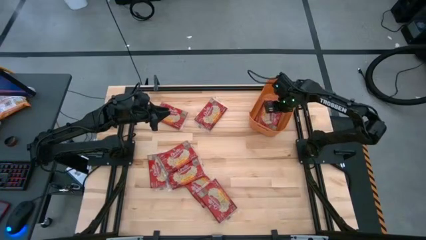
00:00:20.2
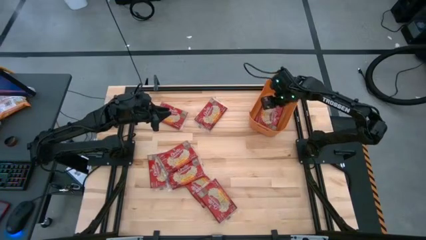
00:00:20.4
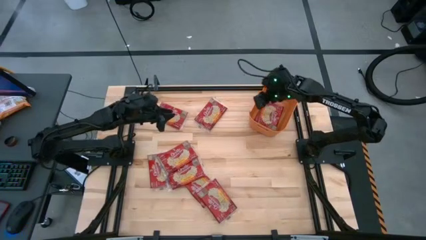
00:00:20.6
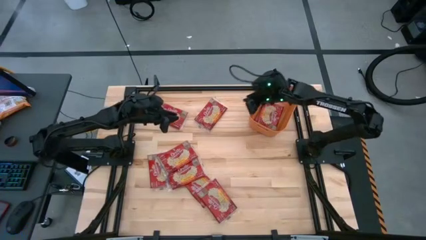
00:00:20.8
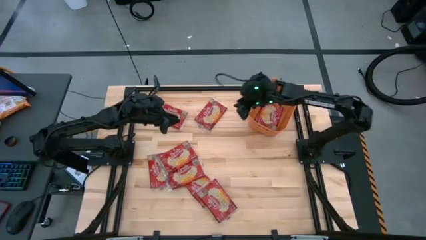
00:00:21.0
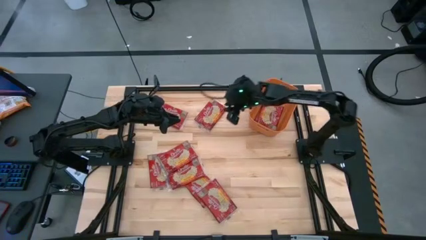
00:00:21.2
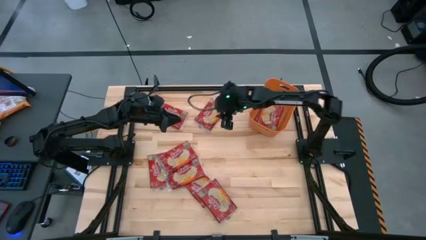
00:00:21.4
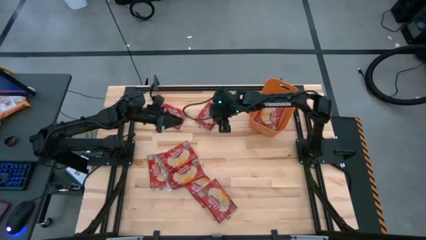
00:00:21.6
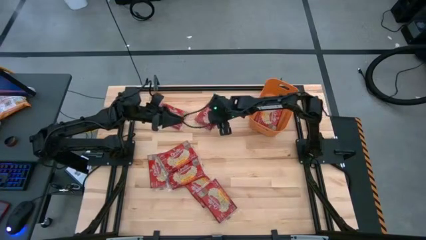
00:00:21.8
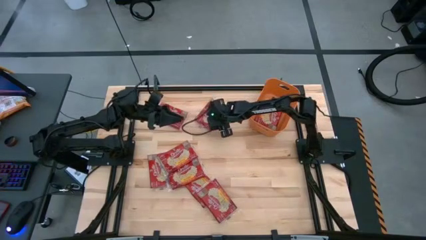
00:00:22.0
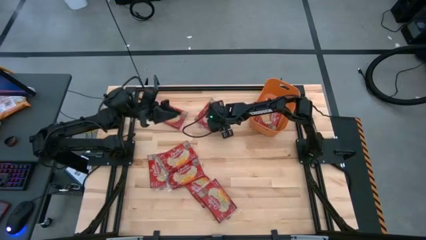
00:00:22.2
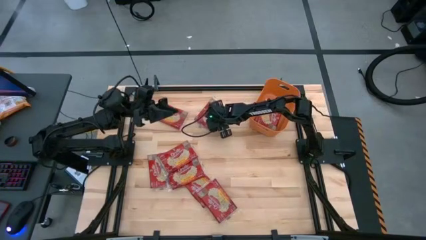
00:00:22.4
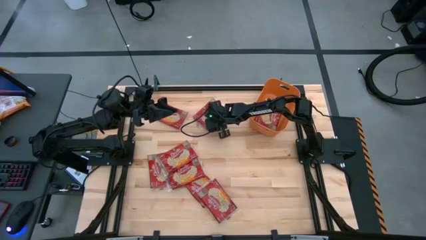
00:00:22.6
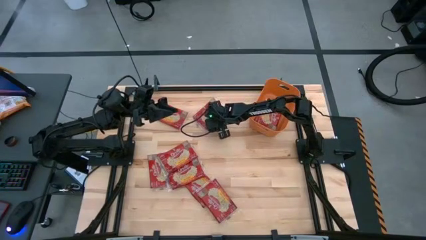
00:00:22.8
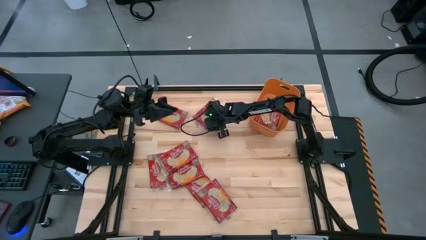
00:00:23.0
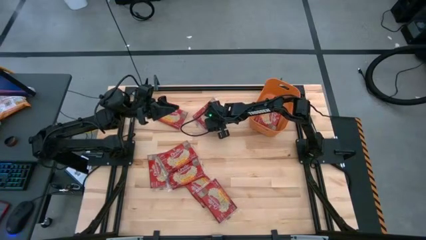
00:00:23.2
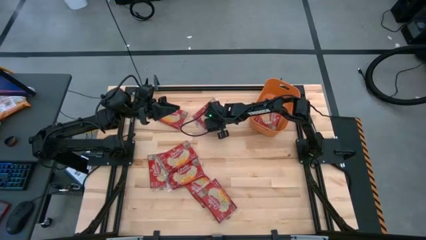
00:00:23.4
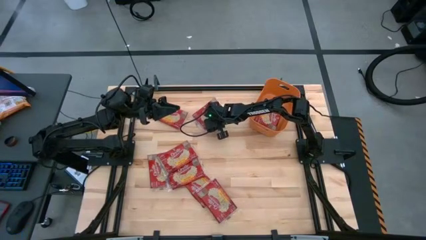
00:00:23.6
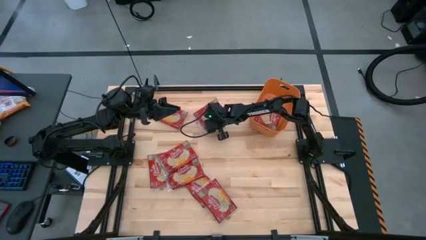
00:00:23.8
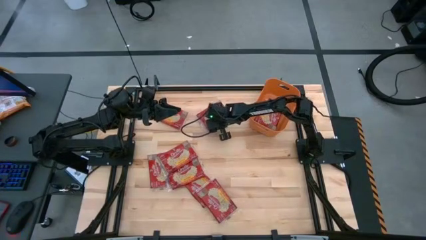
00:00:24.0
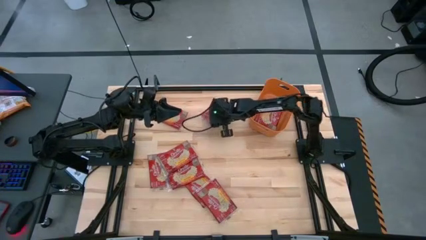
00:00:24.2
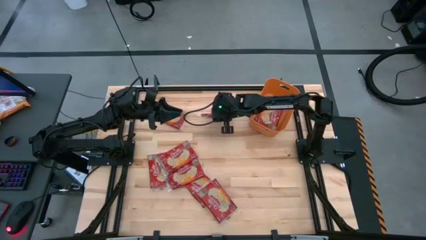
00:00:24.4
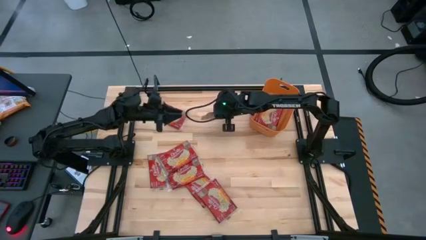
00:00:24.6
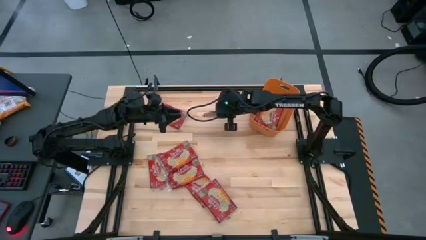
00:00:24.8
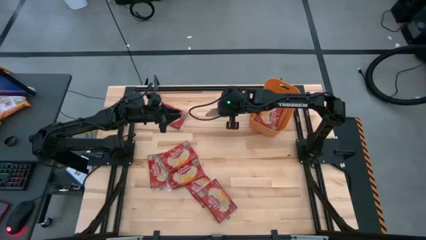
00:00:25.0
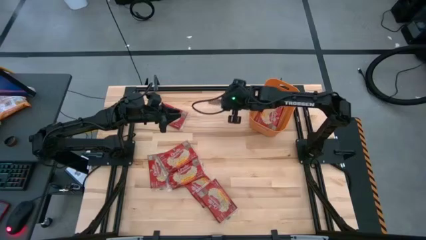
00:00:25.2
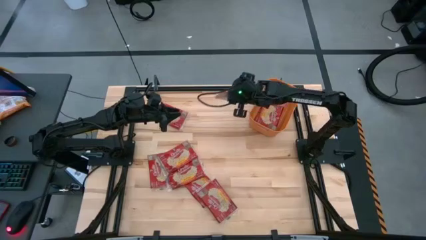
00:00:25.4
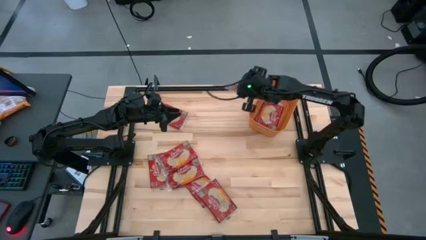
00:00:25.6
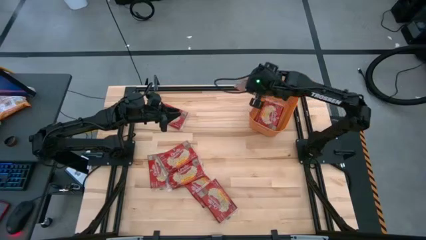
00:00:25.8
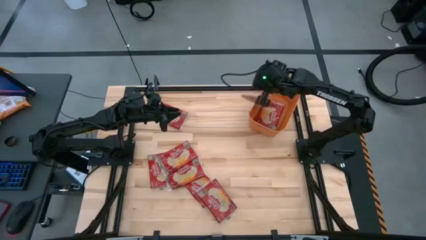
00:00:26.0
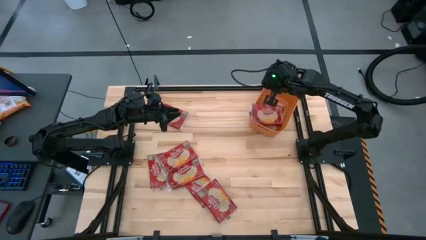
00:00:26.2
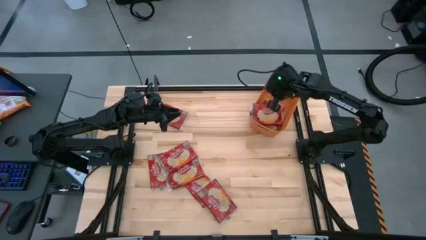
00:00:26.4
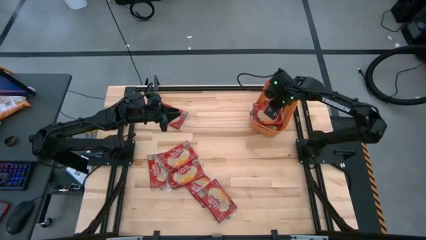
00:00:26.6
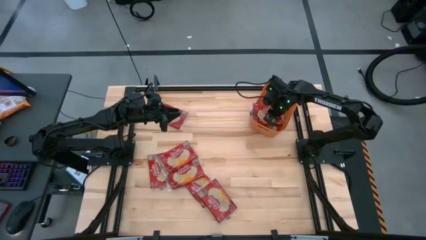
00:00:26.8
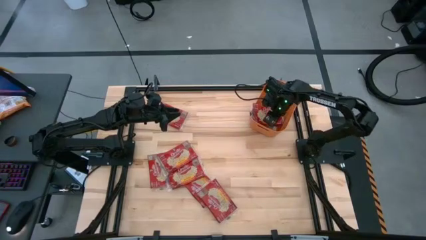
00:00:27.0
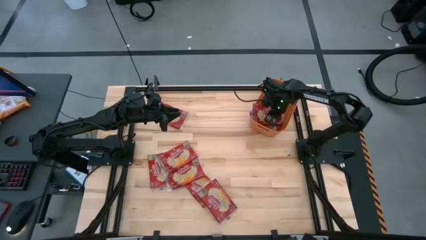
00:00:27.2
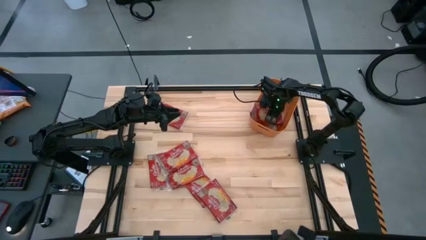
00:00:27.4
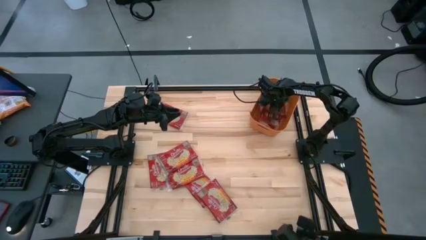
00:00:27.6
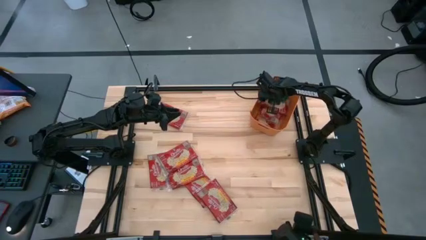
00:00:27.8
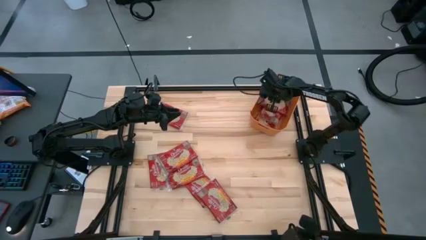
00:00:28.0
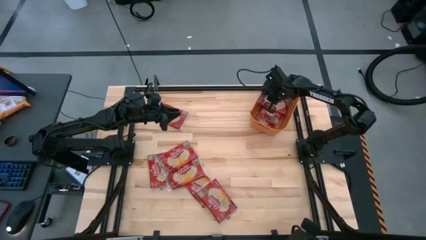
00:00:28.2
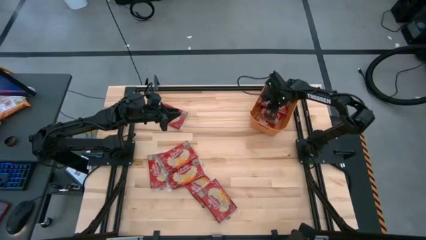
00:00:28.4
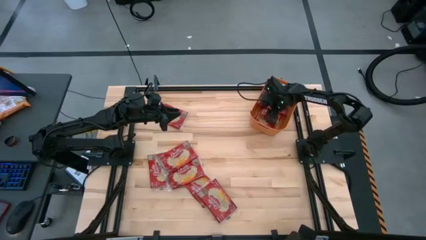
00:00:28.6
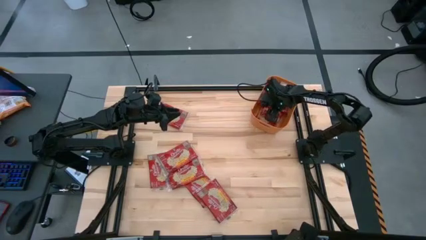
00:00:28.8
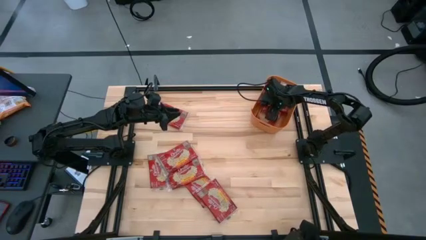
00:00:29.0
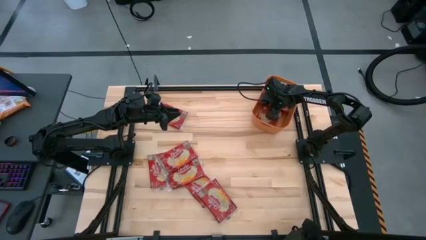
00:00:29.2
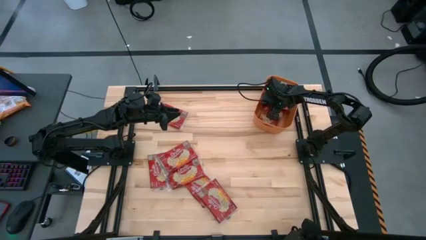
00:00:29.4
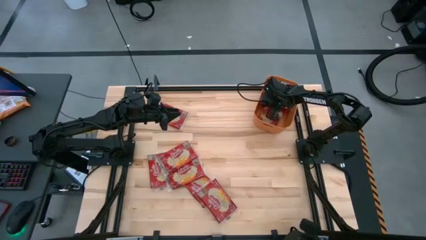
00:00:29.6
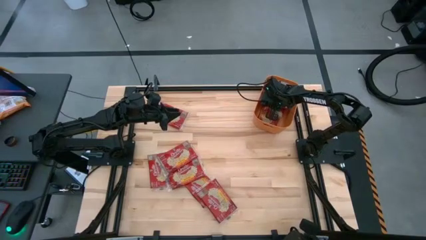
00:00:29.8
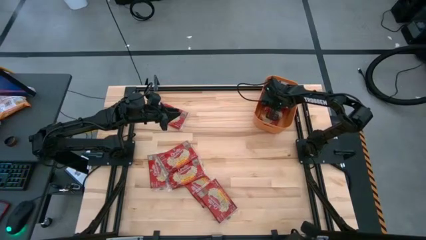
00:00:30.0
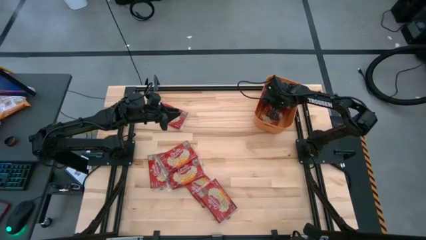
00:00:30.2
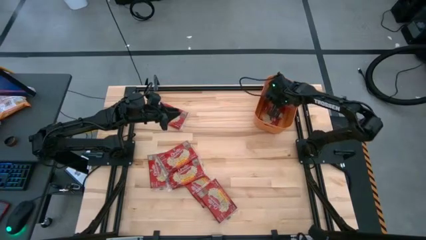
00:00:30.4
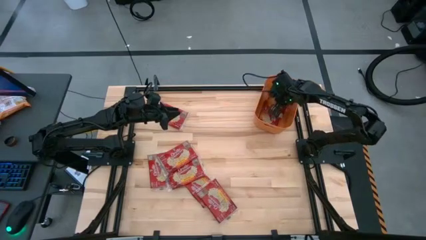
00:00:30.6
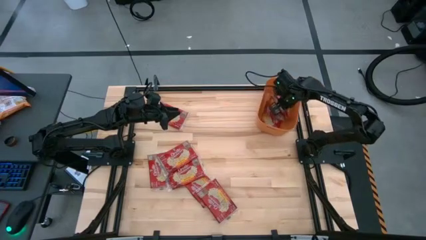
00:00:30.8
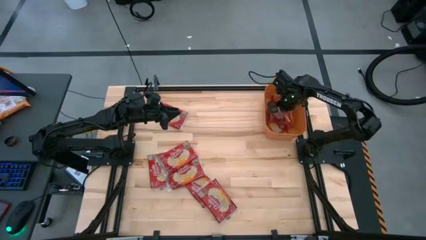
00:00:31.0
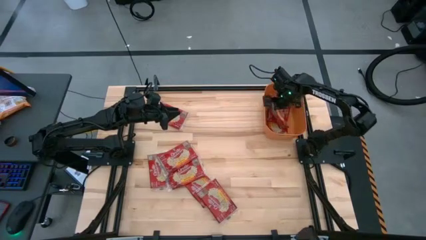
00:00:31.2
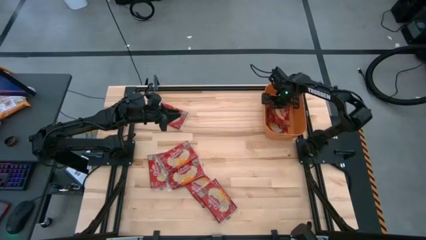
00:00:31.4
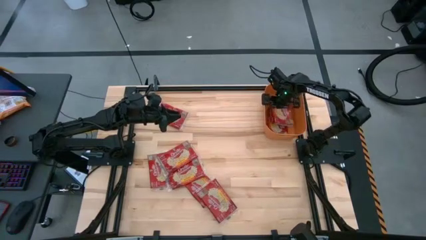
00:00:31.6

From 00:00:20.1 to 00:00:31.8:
Task: Sort popcorn bags into baskets
Stack the red popcorn on the orange bin

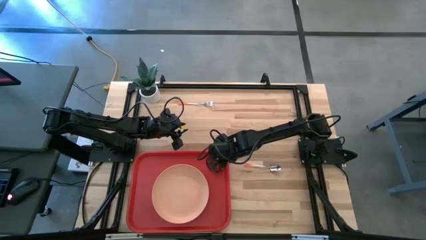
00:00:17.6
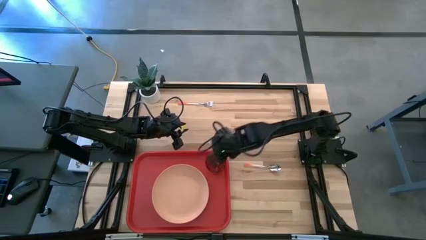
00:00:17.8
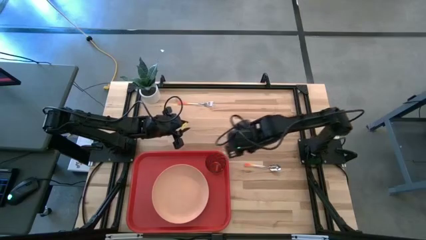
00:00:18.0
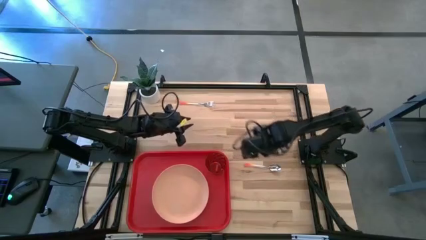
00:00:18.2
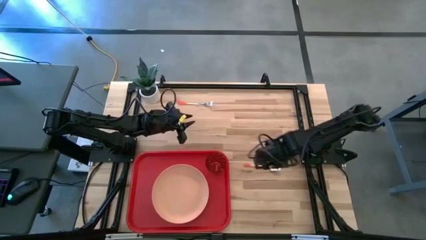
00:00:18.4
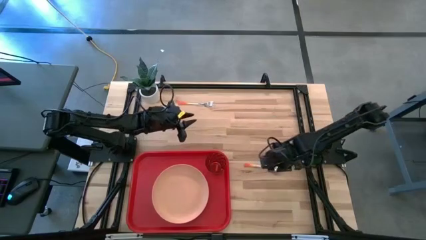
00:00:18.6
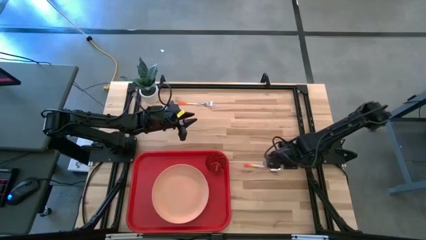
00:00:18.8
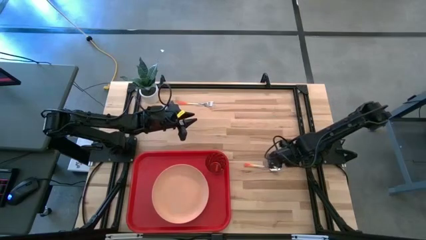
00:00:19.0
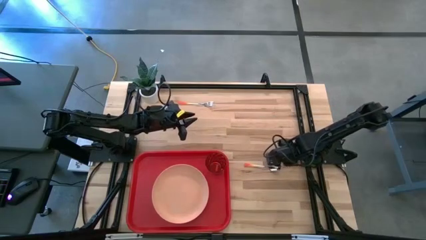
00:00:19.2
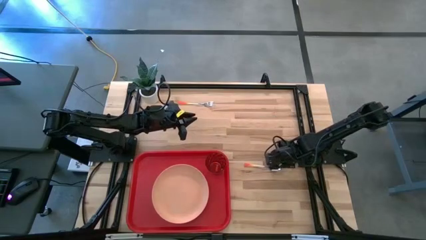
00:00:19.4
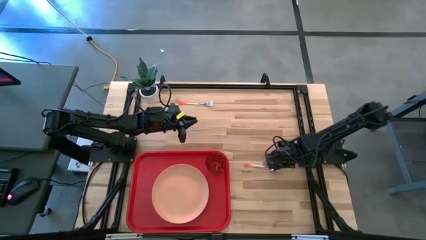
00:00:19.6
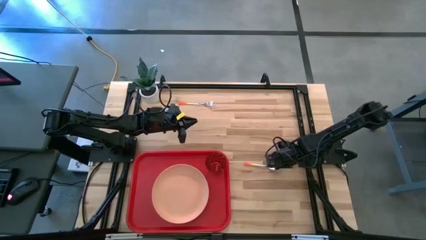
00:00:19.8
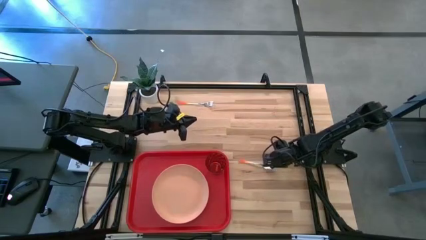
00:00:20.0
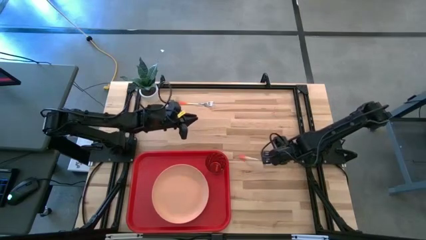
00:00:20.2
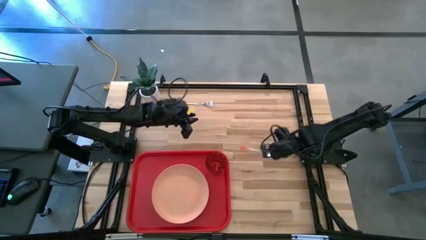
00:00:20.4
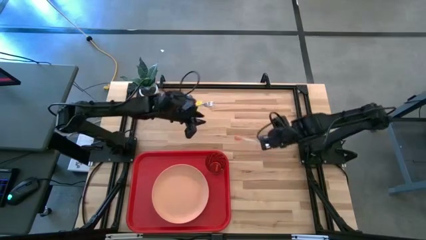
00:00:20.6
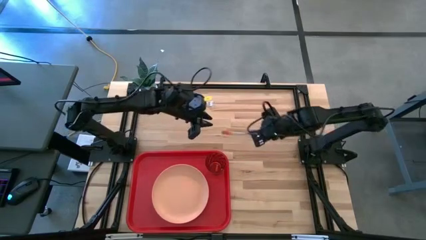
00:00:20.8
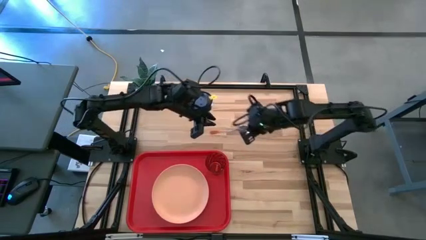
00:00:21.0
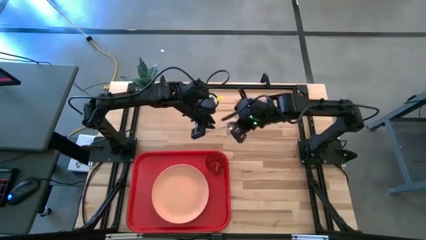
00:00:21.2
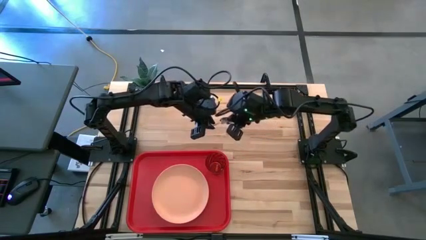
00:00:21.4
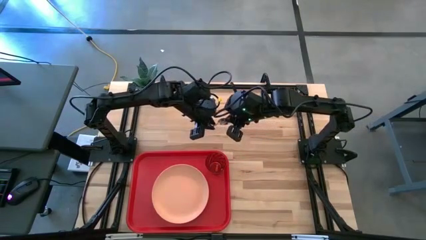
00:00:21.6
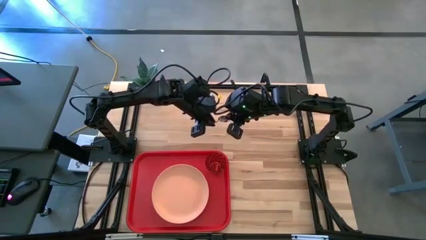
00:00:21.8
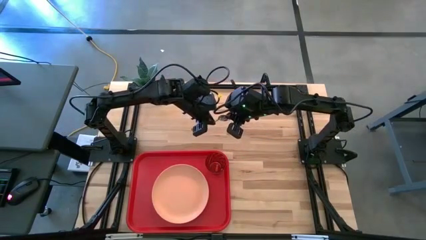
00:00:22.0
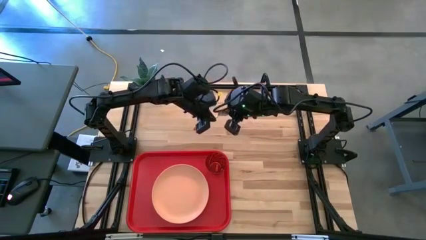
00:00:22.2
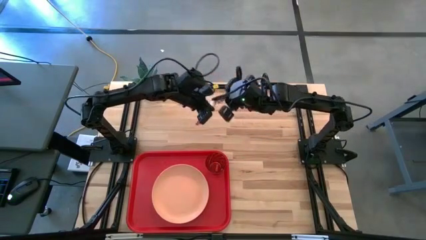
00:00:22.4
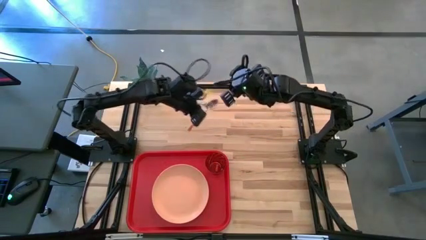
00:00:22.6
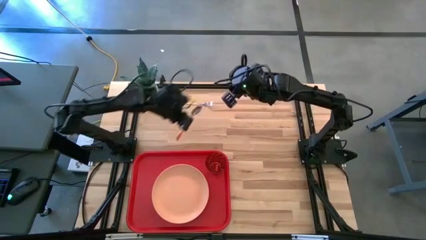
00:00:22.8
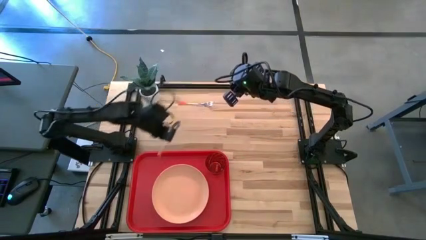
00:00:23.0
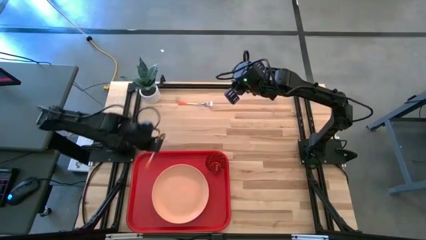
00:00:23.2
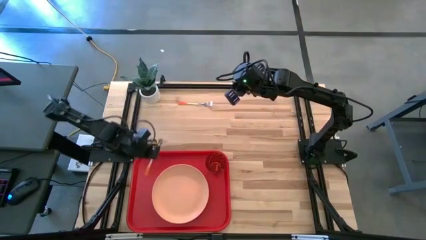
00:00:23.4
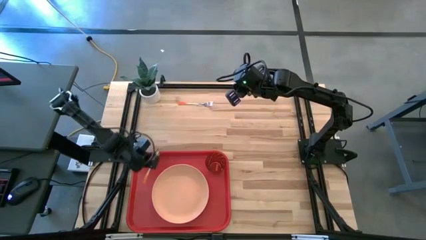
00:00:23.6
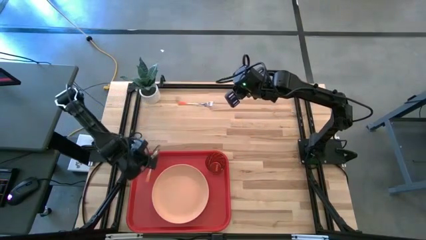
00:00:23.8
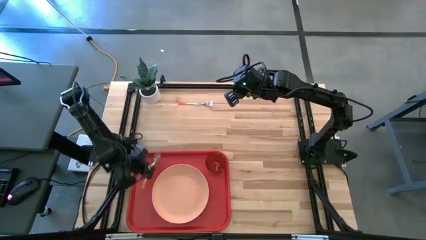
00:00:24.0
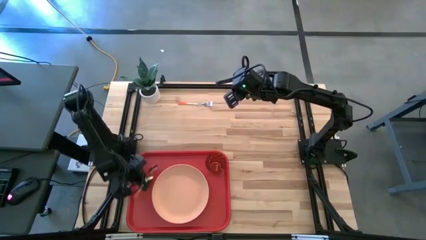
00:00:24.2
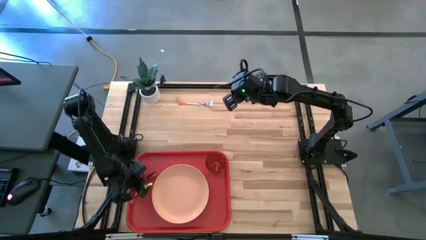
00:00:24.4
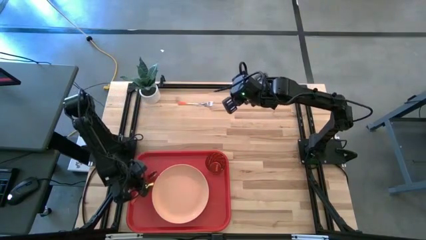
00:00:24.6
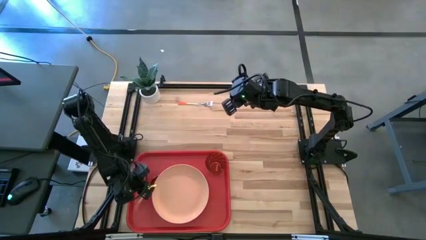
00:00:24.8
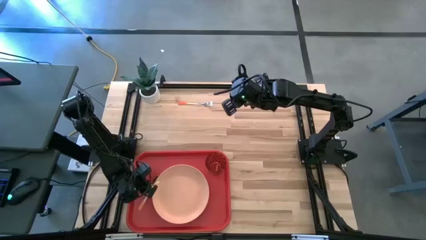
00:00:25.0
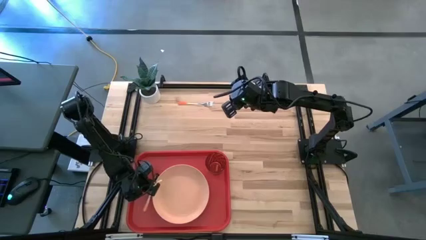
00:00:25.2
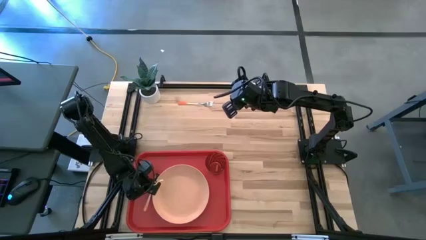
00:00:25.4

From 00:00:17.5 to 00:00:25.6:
Task: Pick and place plate/cup/fork/spoon on tray
Put the orange spoon on the red tray to the left of the pink plate
